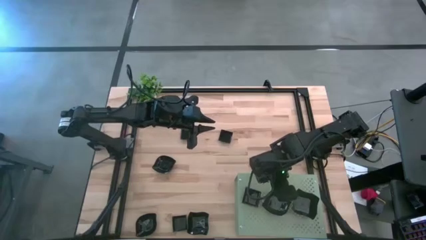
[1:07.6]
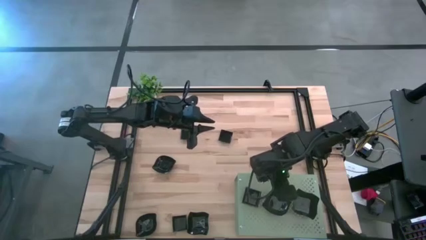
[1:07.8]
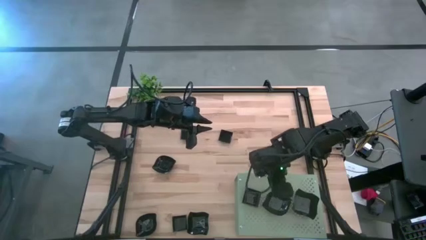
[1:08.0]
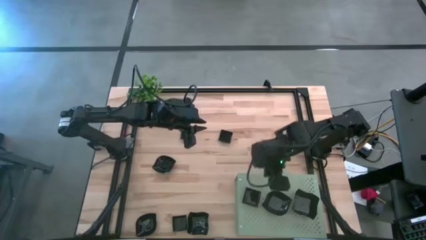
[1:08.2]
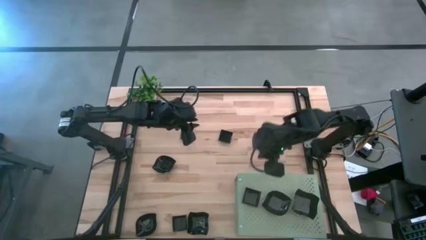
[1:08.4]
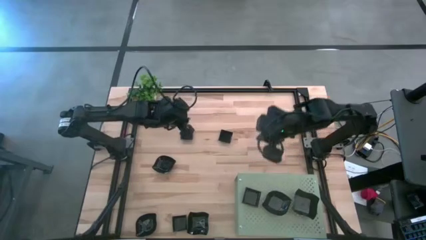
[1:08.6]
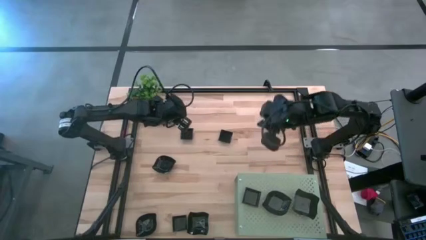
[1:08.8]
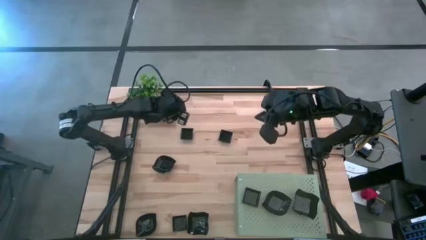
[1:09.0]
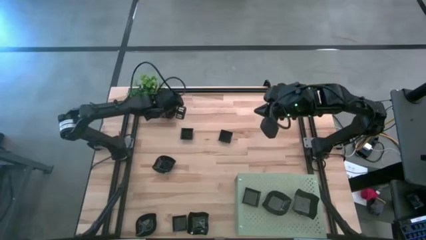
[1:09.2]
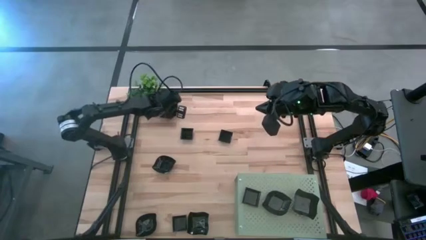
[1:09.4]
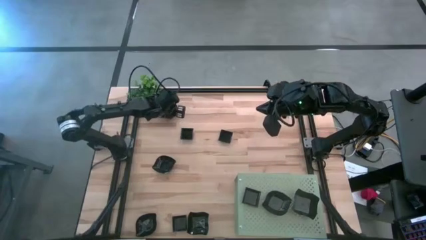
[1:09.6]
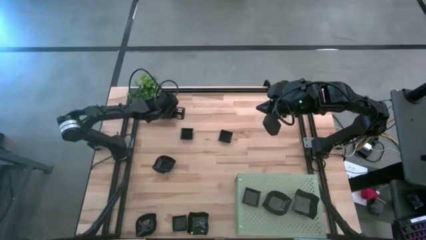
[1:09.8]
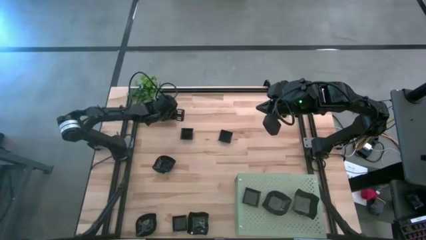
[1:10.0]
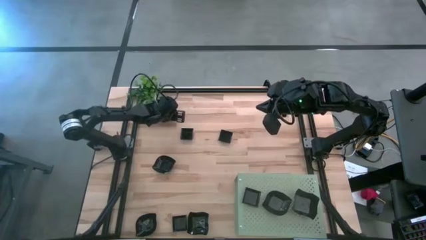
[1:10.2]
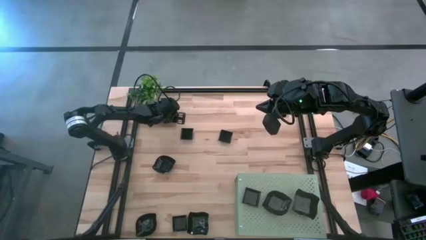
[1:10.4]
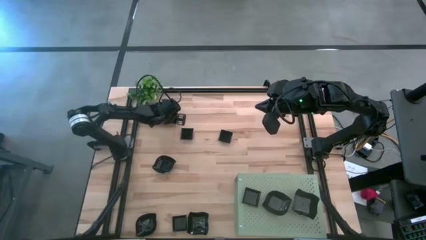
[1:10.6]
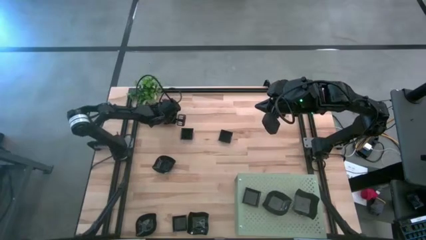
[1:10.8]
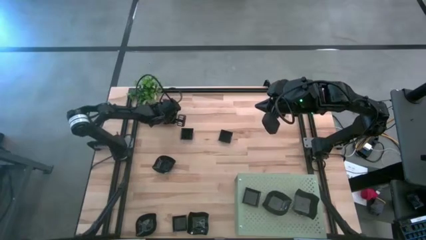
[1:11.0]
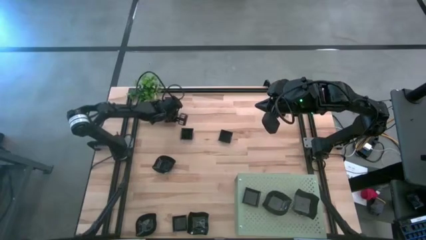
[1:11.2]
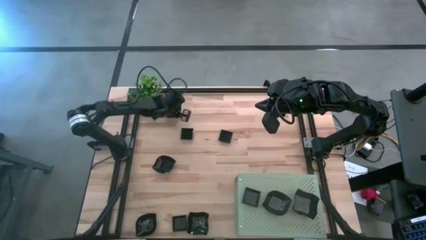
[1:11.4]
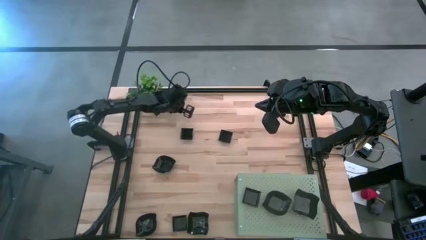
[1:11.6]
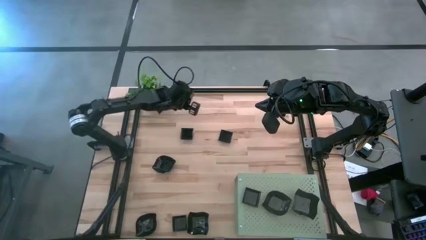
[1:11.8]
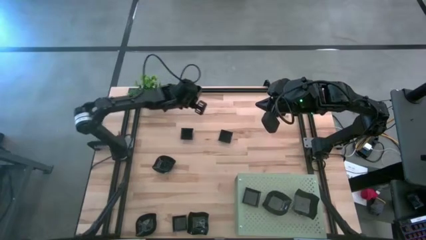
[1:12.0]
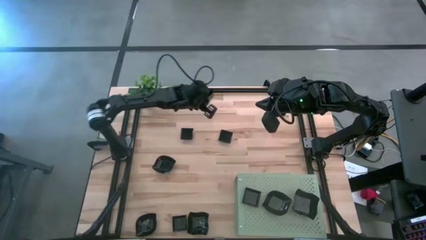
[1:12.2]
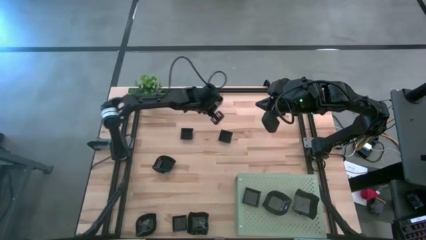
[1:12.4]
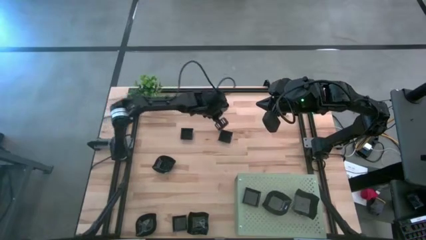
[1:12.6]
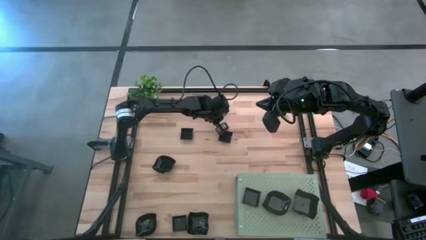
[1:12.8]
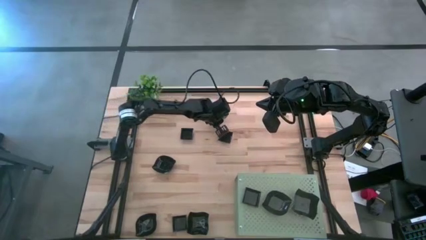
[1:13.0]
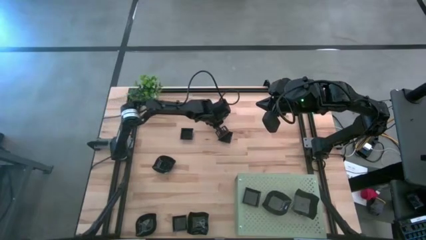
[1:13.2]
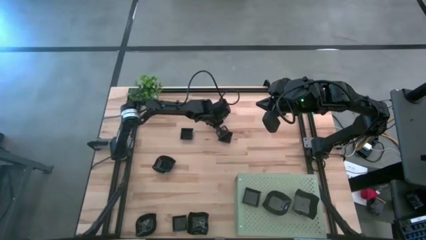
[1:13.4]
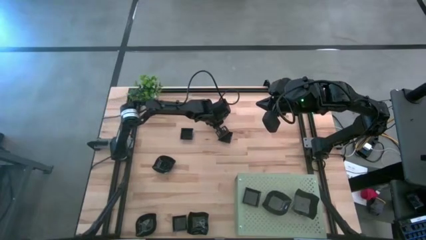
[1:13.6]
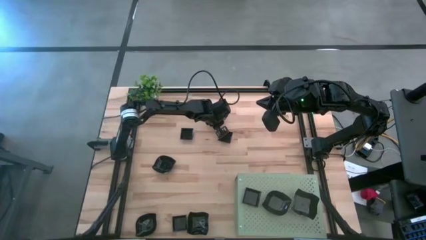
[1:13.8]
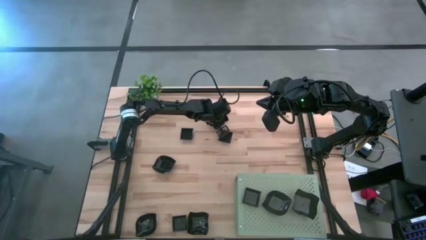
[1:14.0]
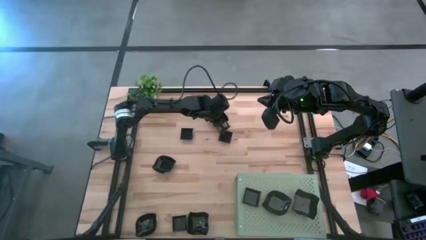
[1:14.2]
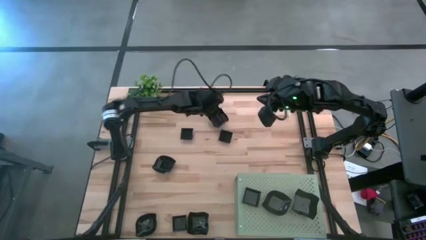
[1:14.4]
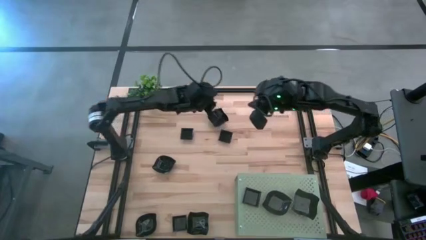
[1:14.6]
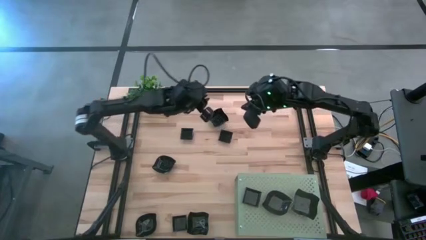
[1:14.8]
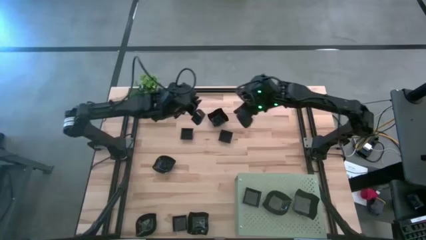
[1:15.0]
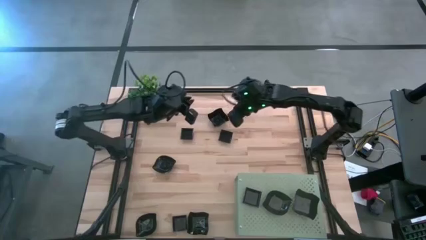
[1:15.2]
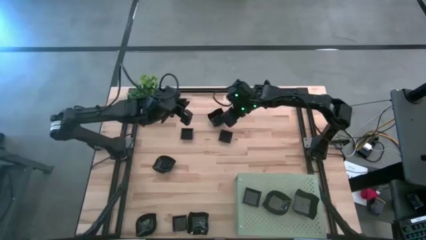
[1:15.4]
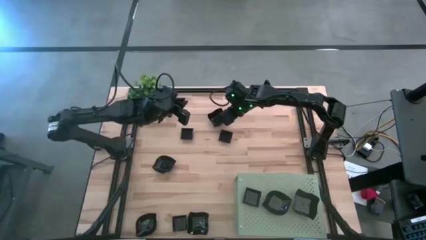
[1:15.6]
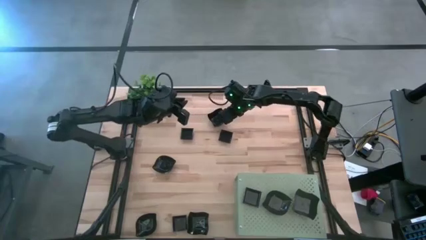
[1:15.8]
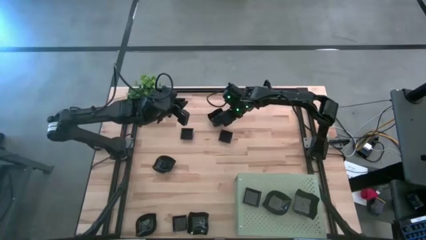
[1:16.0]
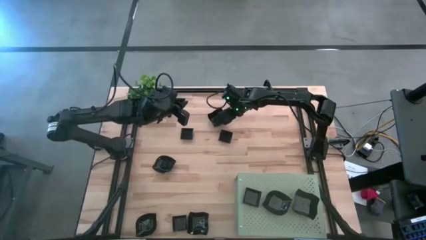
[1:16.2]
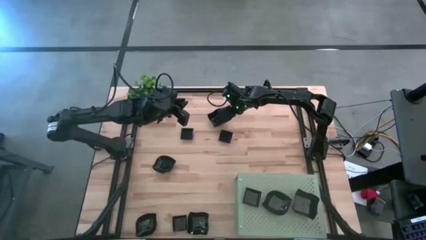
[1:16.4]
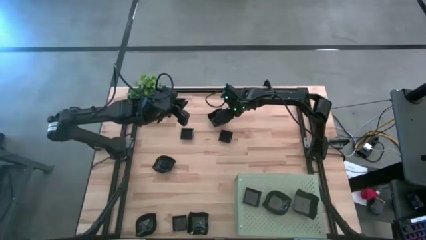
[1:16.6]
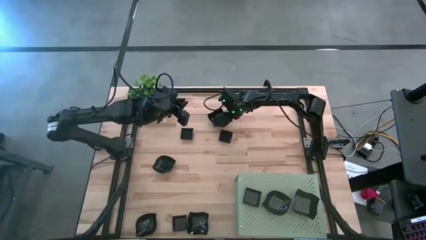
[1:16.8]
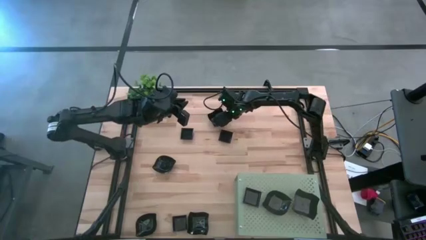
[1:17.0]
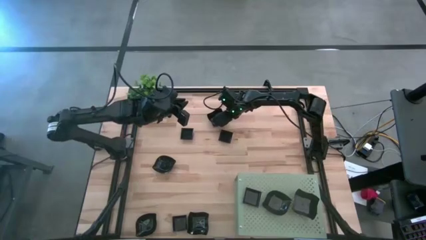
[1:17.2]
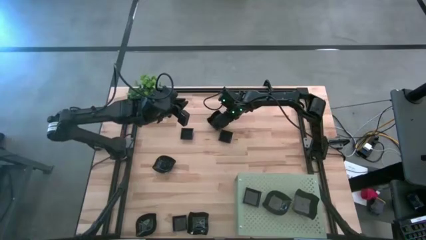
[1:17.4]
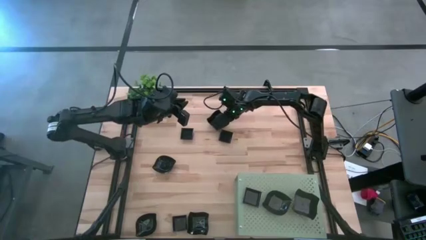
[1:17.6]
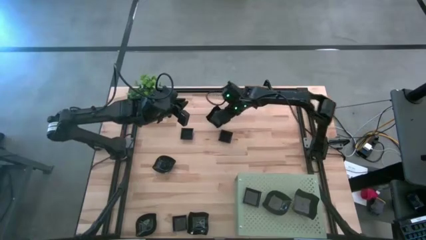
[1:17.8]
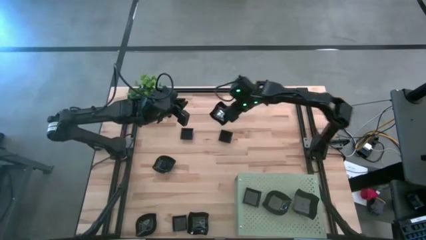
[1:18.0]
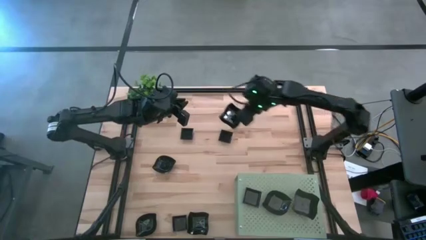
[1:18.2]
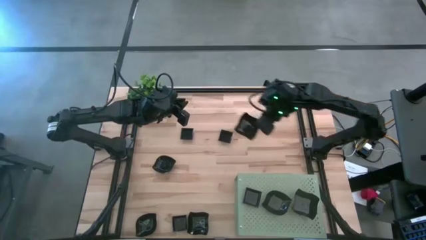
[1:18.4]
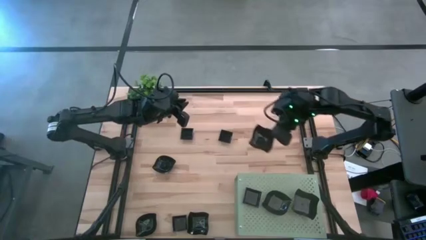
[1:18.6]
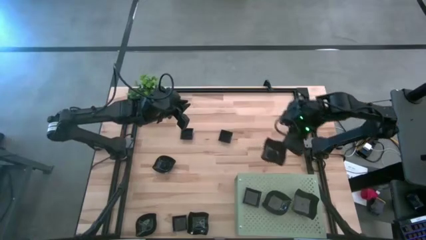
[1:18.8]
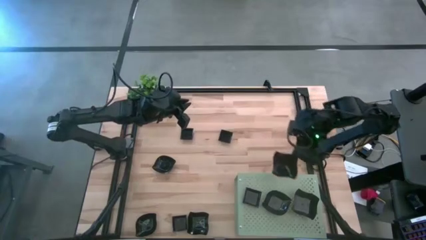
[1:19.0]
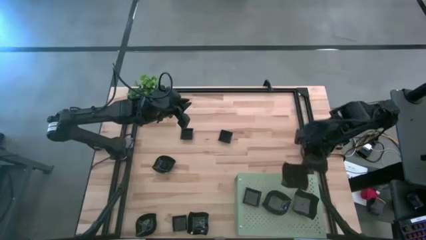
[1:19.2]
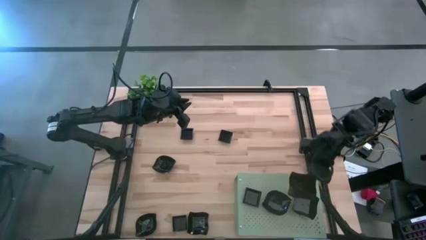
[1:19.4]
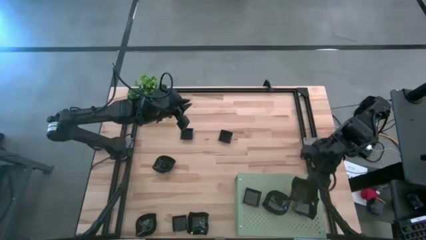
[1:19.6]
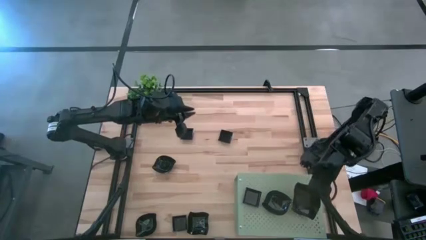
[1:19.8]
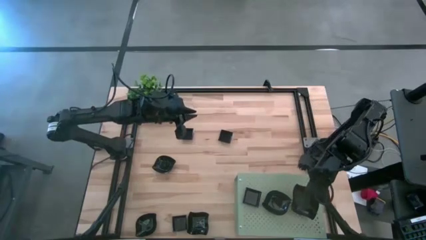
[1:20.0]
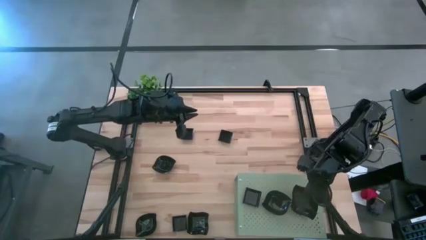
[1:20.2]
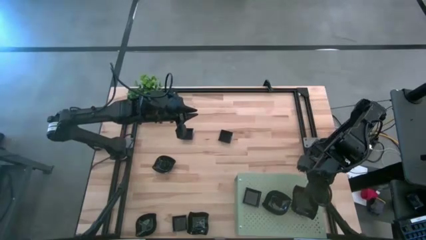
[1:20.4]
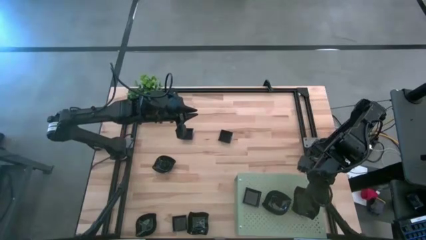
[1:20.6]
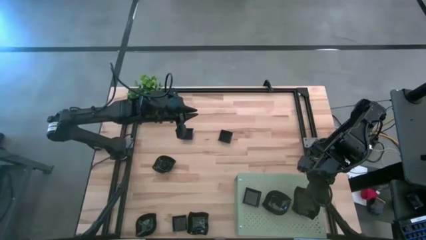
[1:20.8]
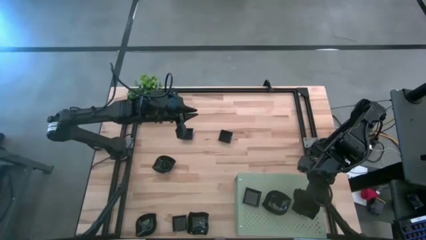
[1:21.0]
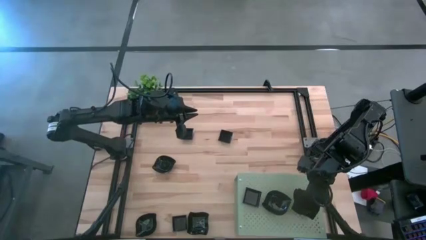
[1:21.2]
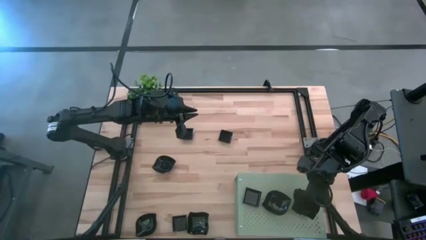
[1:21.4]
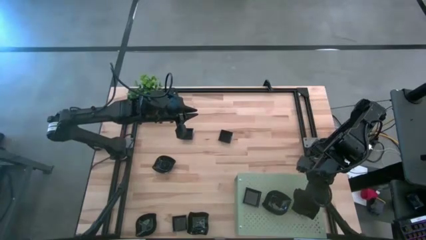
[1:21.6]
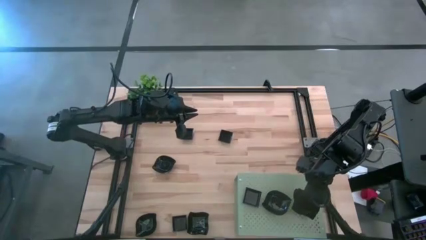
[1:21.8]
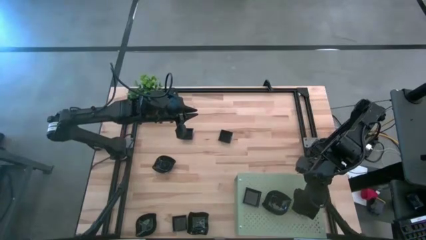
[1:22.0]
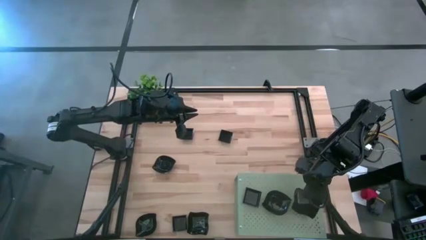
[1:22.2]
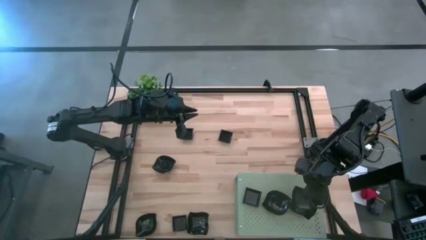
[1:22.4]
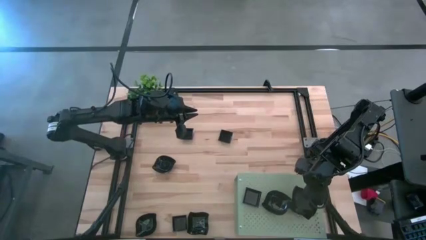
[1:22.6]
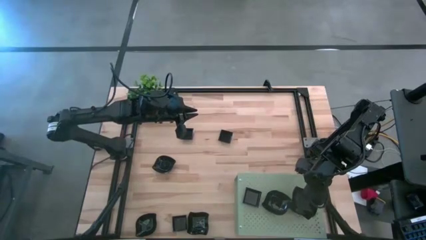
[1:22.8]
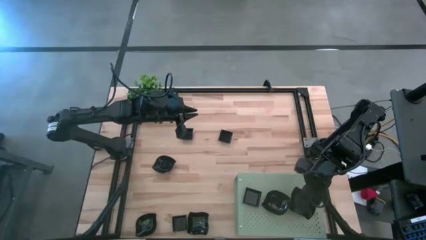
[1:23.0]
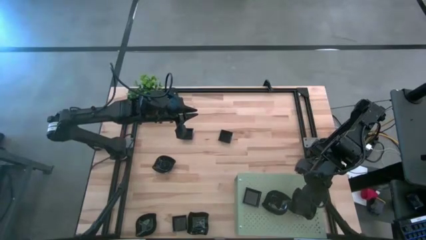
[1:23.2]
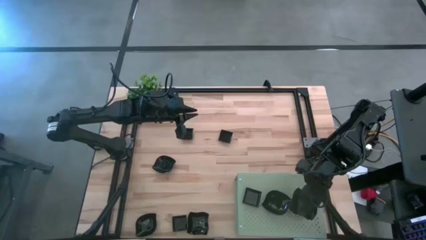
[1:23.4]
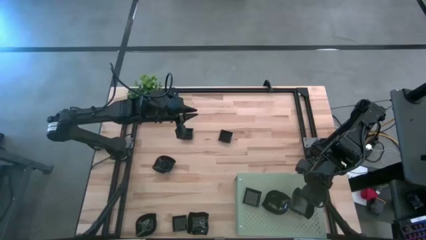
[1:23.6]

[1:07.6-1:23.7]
Task: Pick & Place Mini shaped plates
Stack the distorted square plate on the stacked distorted square plates on the shelf
